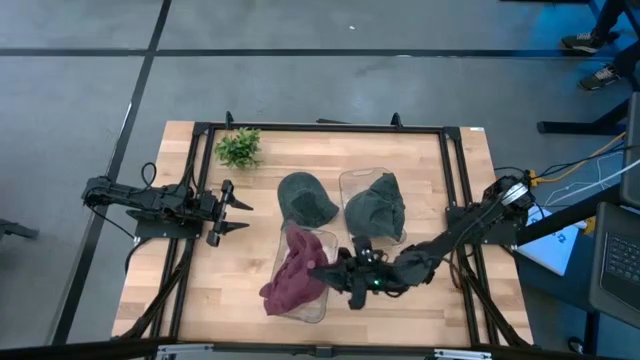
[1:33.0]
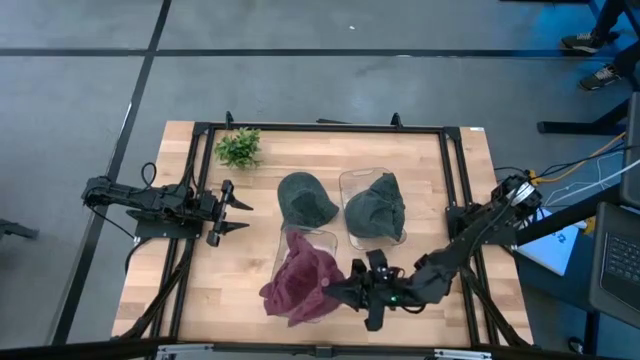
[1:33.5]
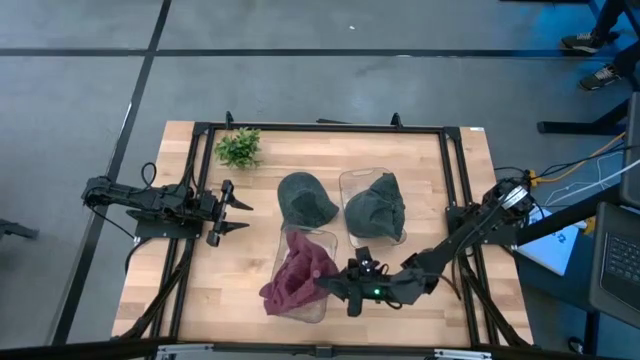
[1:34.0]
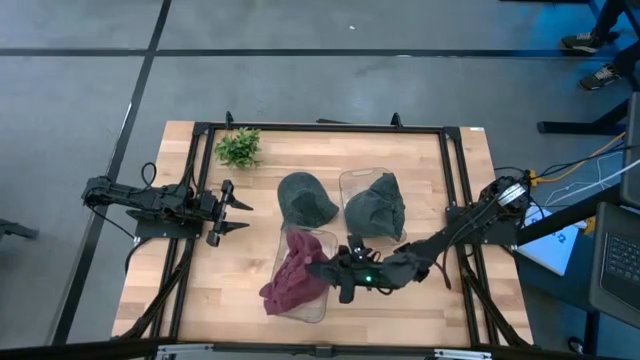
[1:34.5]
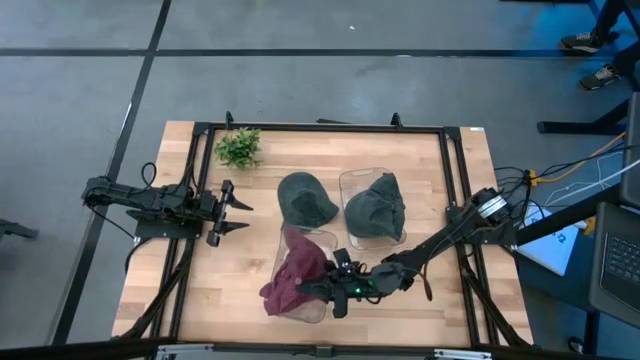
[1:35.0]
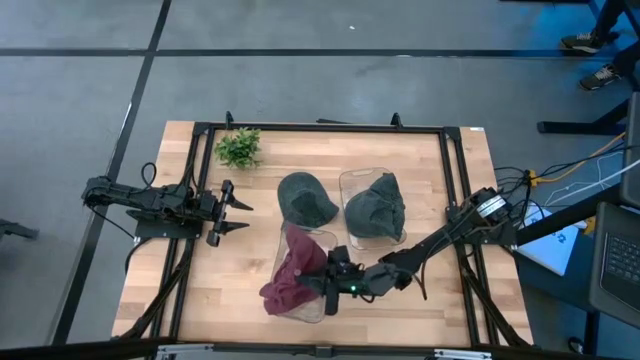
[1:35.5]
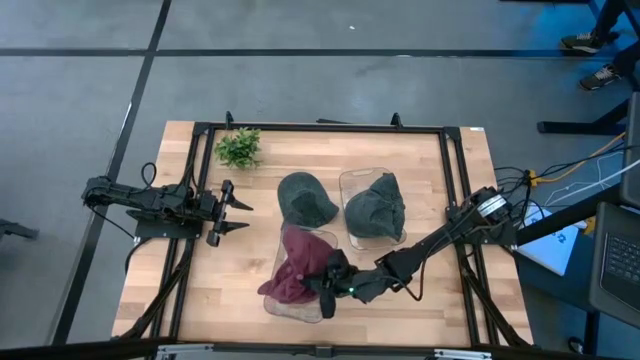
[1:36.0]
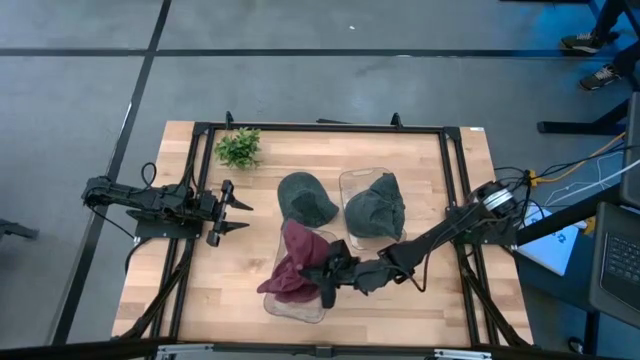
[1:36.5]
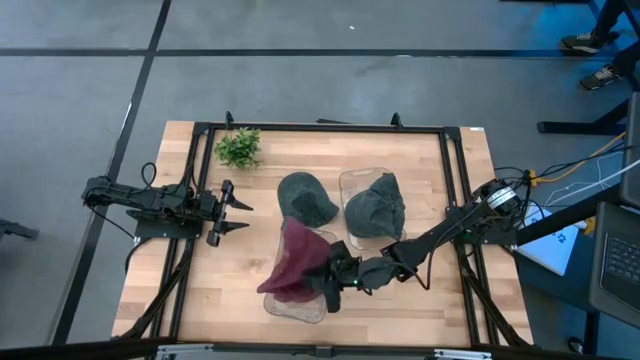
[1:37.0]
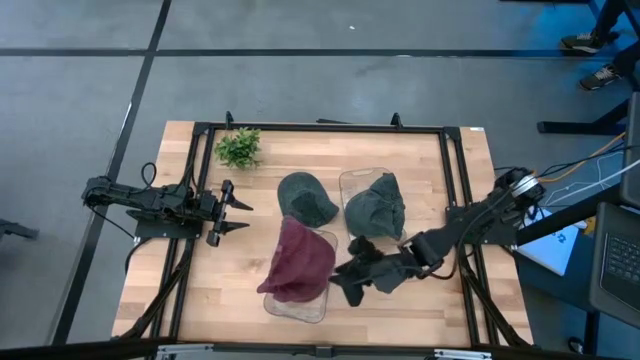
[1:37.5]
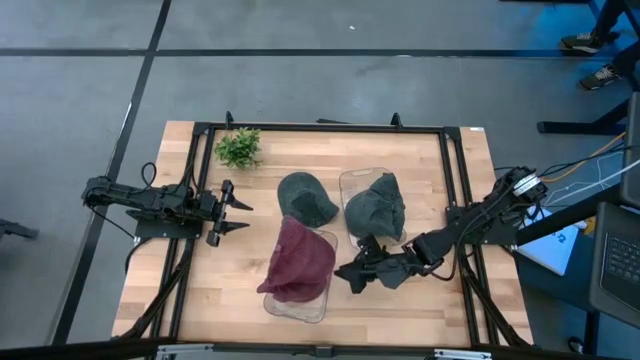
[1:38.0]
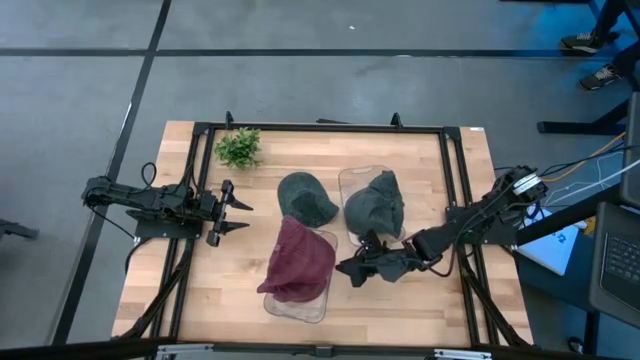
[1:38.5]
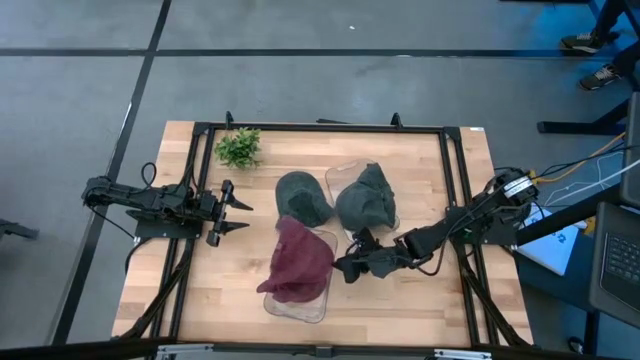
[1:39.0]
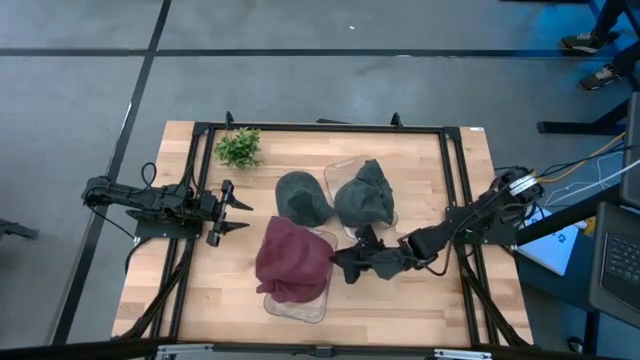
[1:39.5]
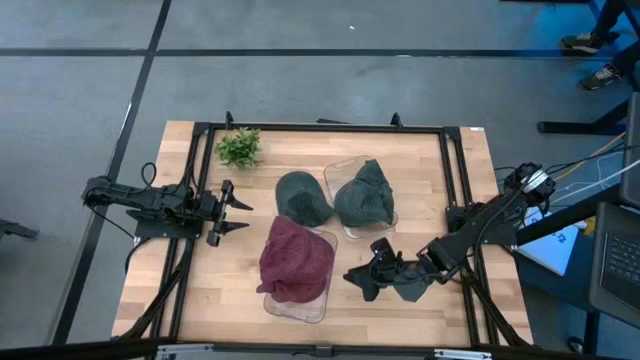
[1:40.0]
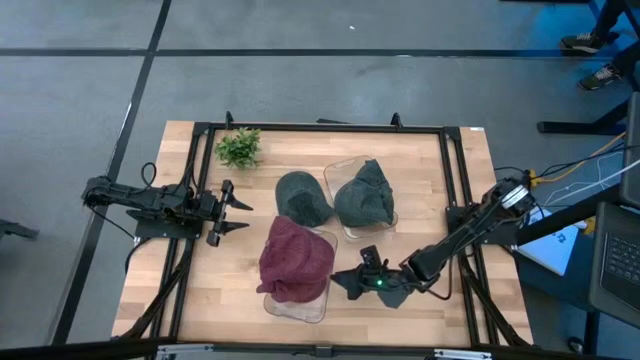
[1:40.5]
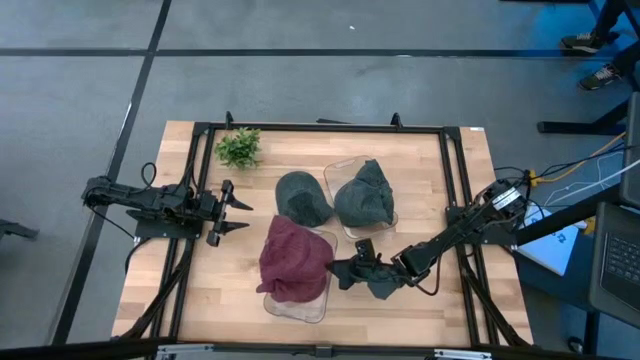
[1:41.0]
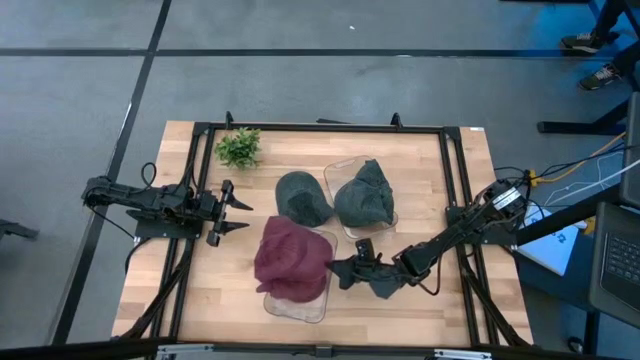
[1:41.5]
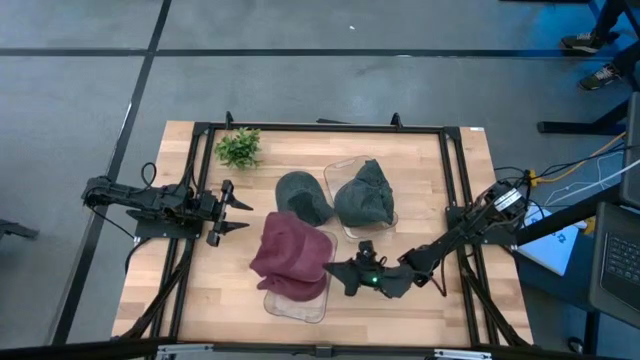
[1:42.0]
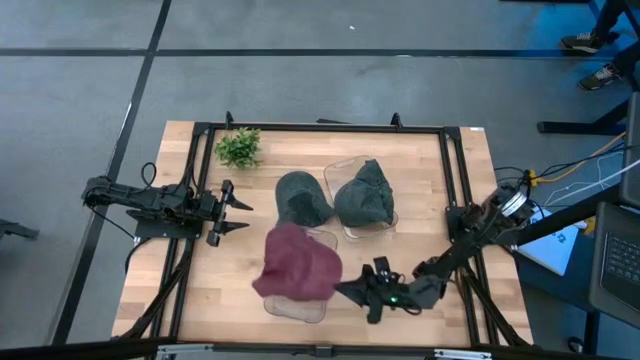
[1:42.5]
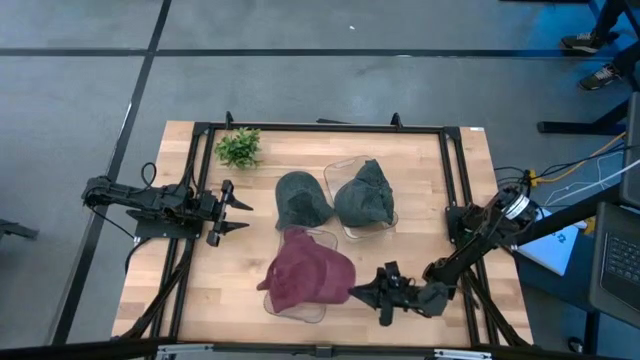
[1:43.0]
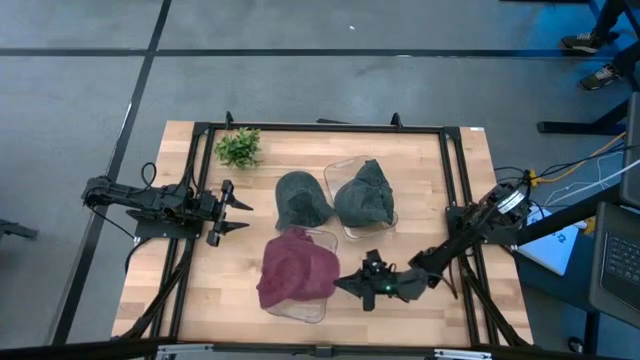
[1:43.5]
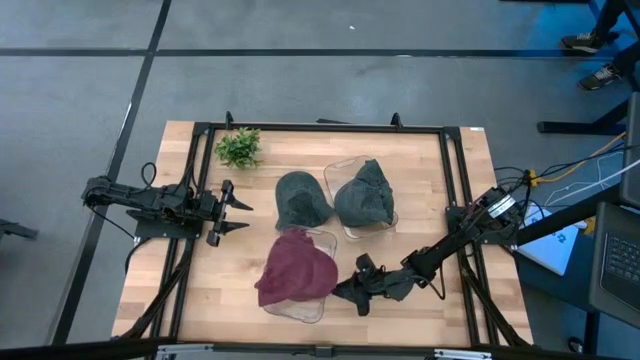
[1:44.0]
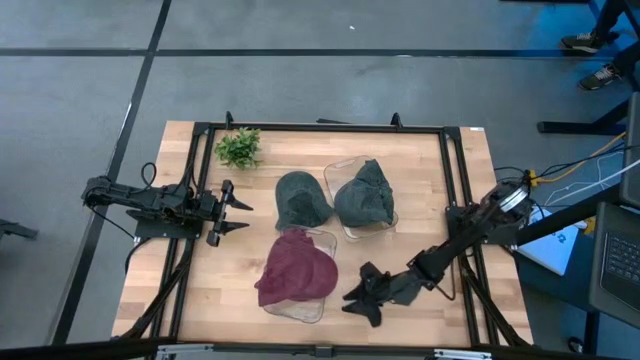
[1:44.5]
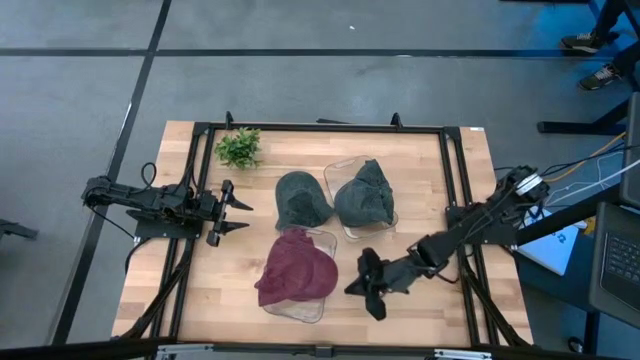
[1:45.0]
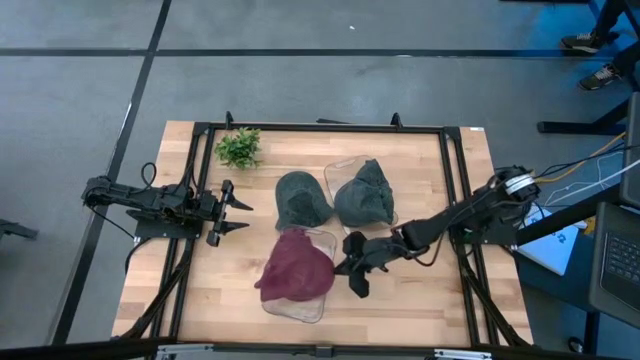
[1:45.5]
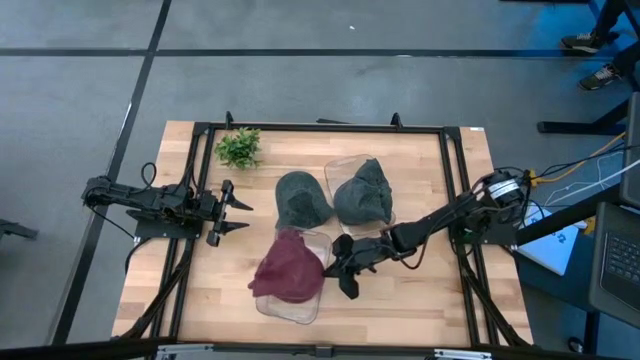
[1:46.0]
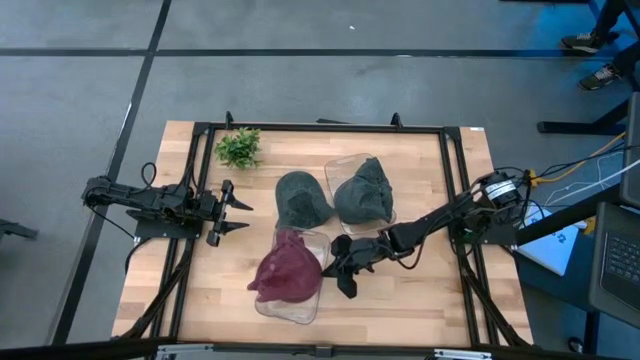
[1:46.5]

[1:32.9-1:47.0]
Task: Pick & Place hat
Put the red cap into the left transparent bin

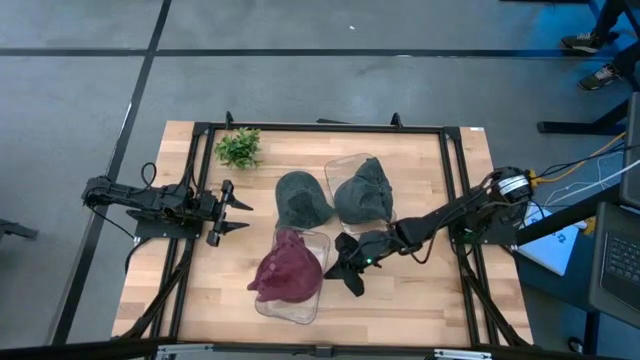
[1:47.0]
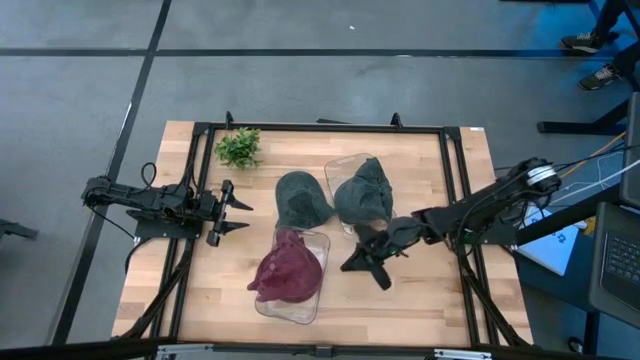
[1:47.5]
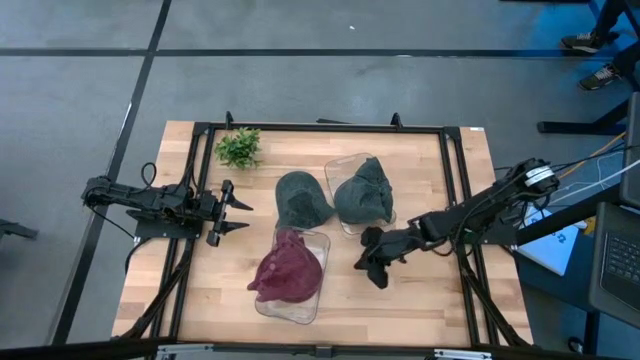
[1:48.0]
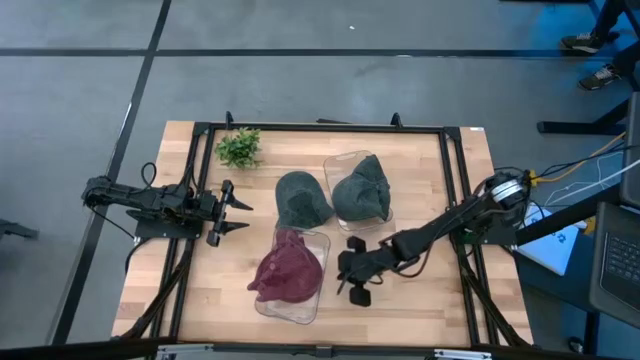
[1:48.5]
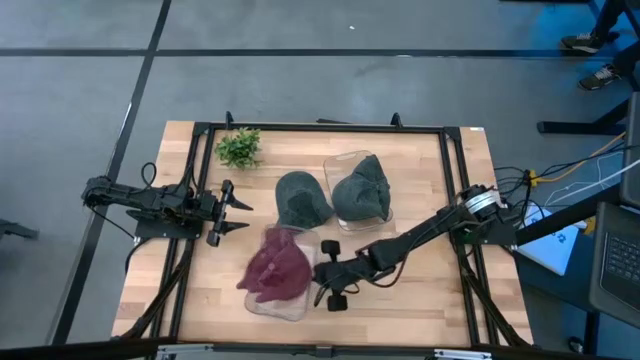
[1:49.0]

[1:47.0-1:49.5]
Adjust the left transparent bin

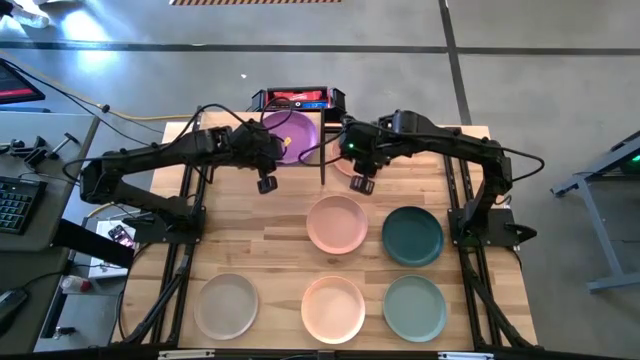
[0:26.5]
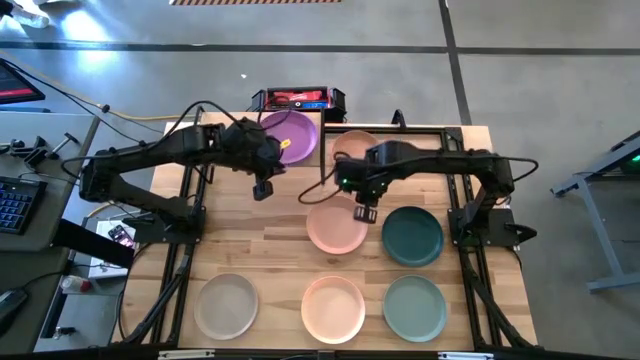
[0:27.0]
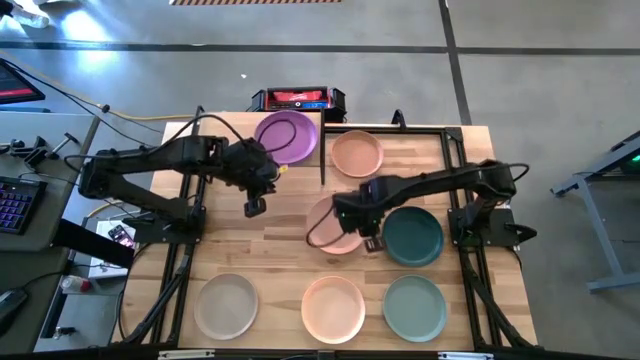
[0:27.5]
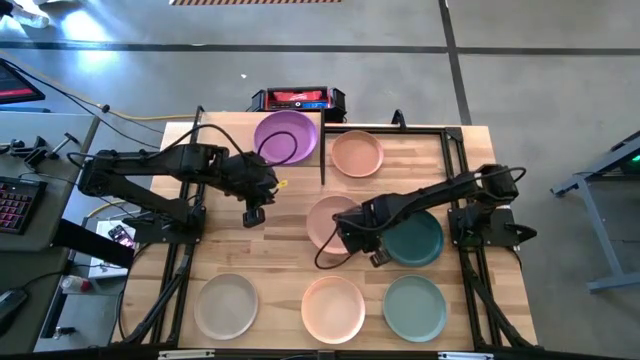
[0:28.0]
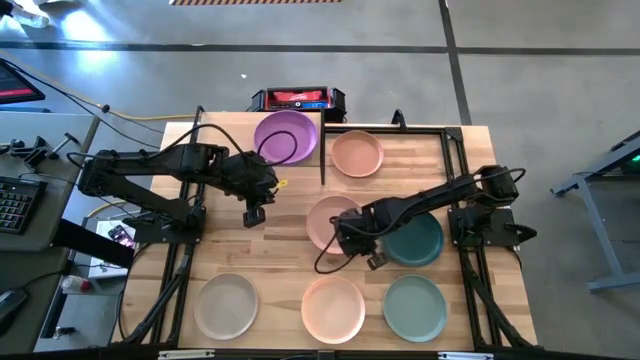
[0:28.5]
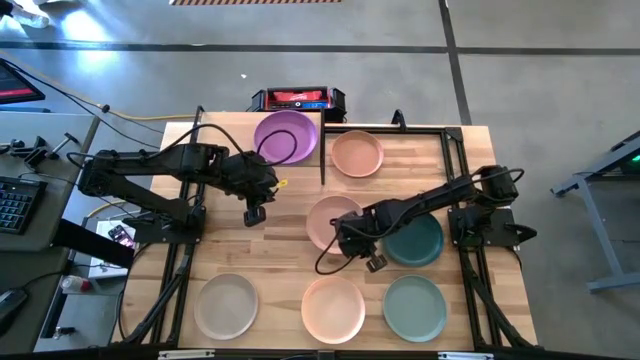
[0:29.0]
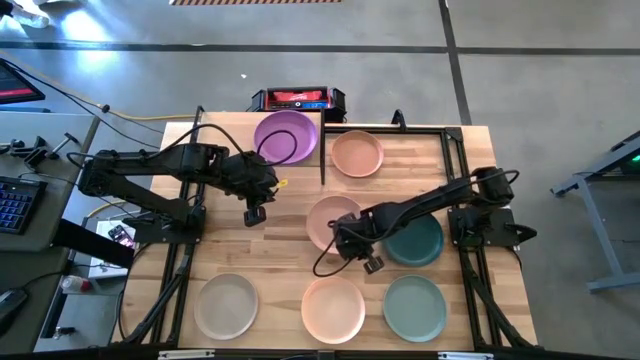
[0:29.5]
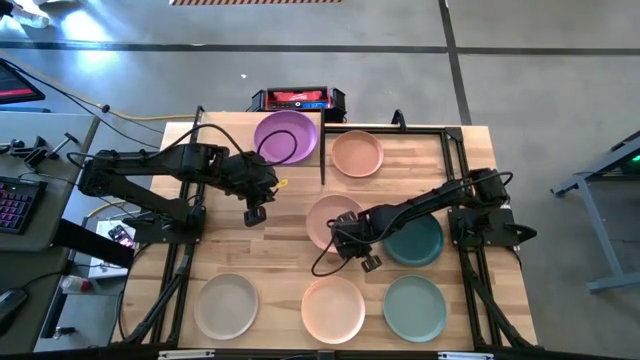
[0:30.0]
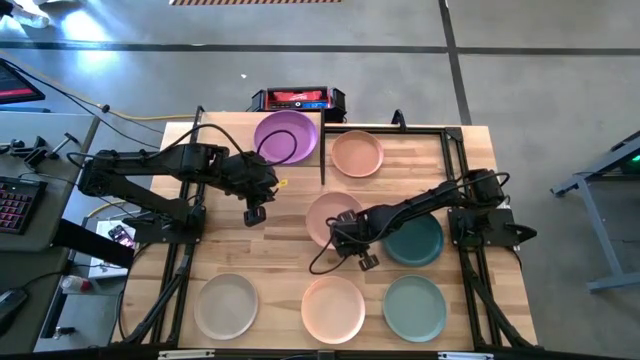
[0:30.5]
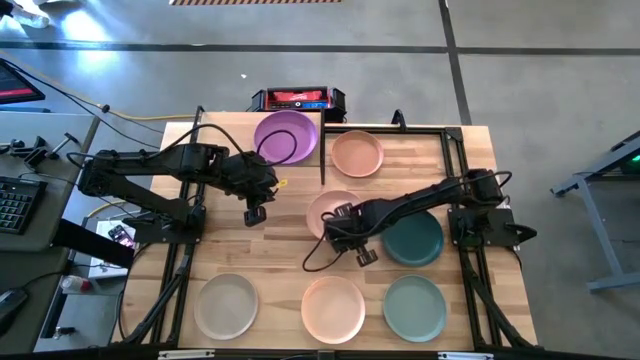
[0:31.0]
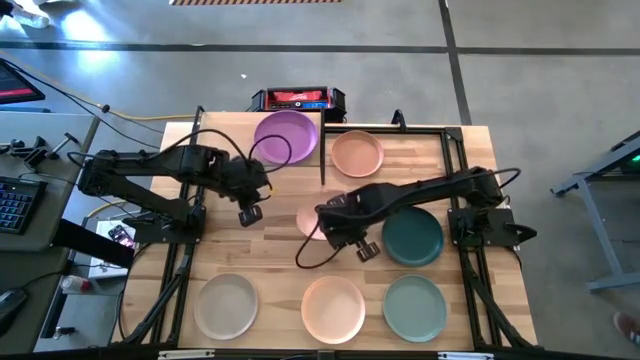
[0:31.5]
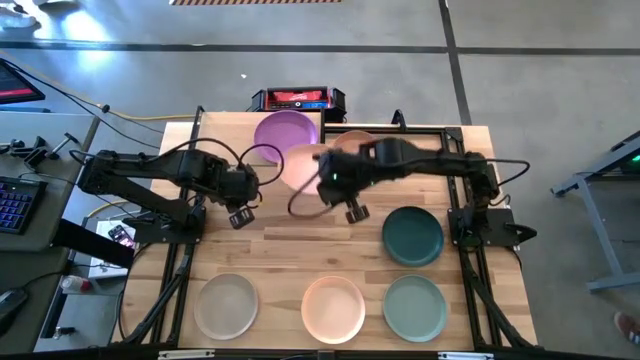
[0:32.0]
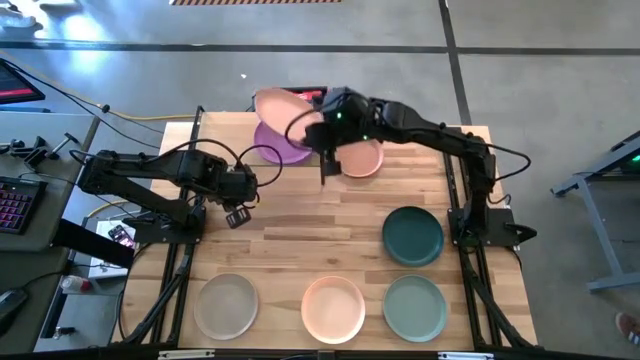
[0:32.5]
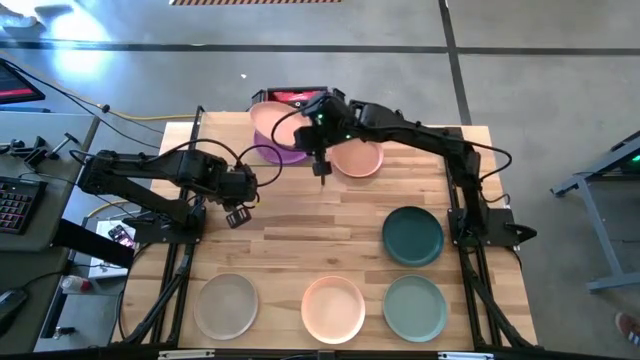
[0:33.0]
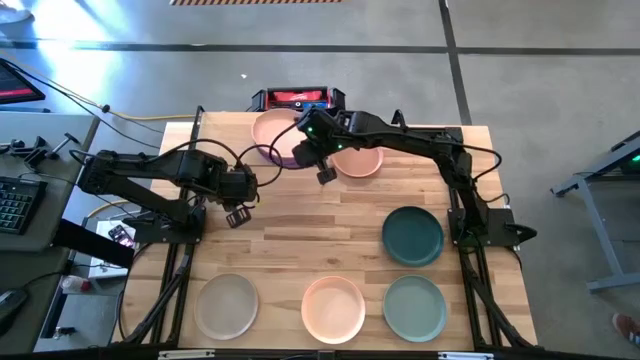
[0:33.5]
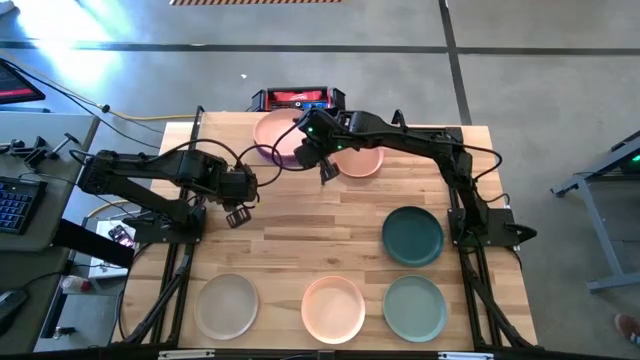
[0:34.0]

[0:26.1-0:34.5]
Task: Place and stack plates onto a shelf
Stack the light pink plate on top of the purple plate on the shelf
